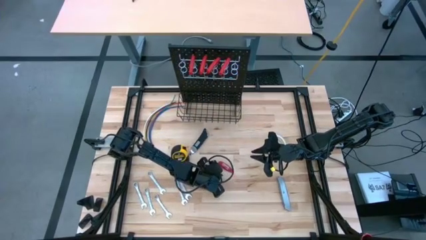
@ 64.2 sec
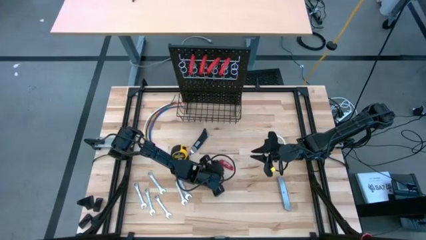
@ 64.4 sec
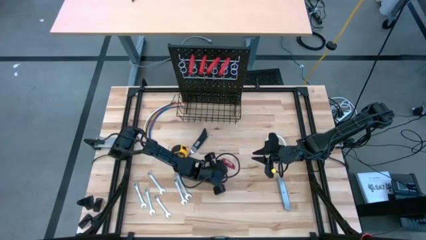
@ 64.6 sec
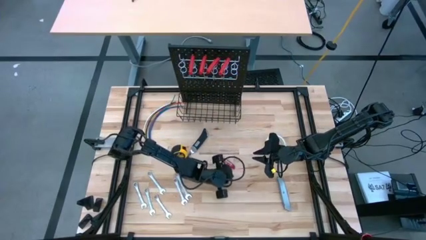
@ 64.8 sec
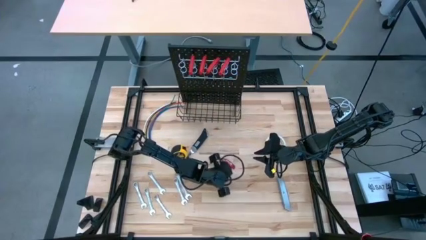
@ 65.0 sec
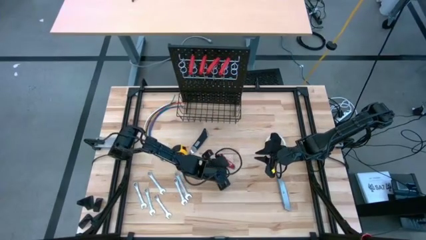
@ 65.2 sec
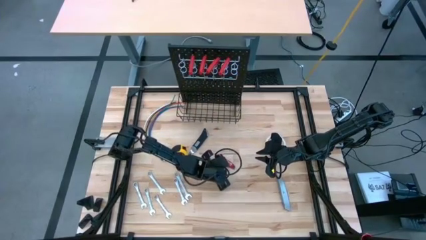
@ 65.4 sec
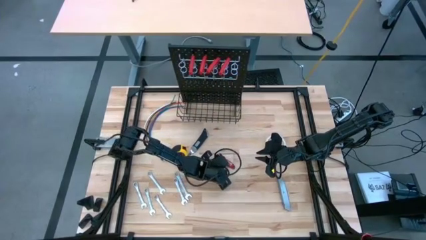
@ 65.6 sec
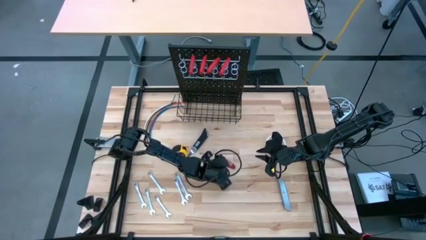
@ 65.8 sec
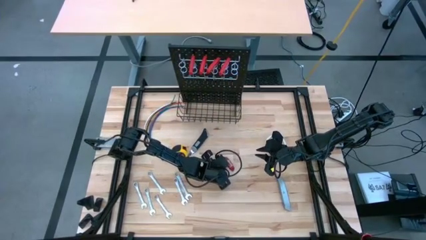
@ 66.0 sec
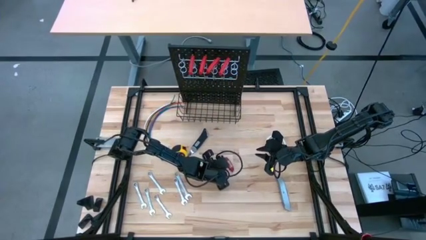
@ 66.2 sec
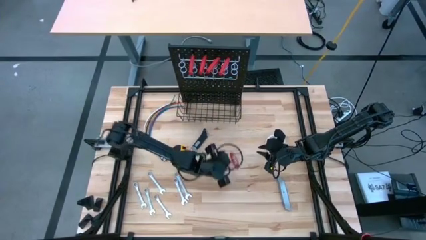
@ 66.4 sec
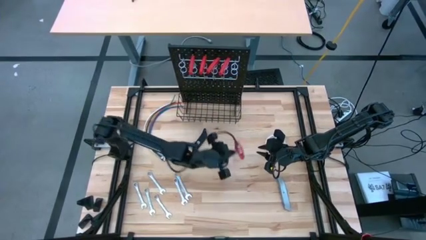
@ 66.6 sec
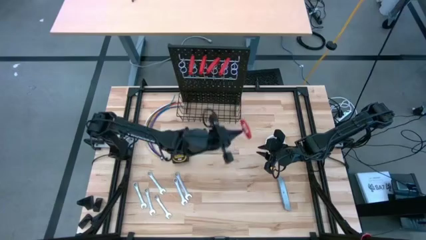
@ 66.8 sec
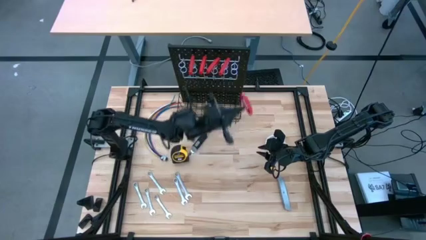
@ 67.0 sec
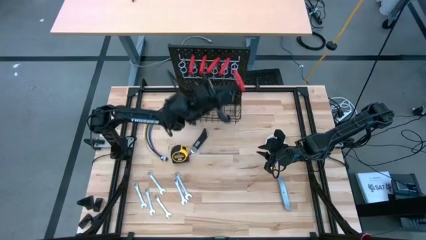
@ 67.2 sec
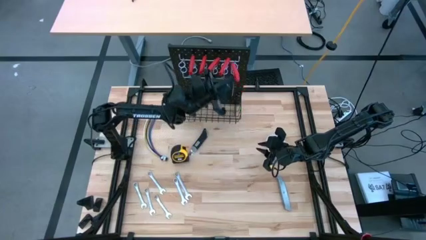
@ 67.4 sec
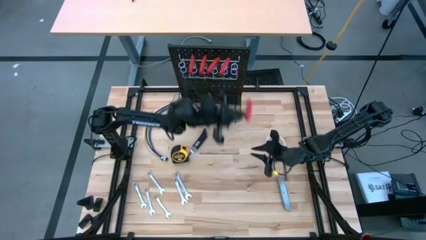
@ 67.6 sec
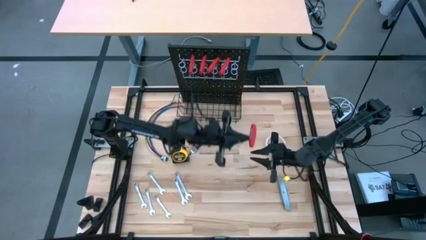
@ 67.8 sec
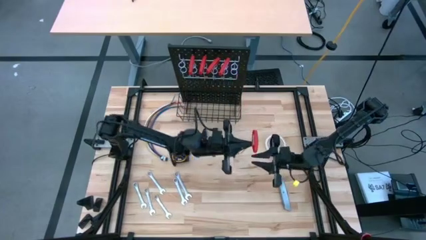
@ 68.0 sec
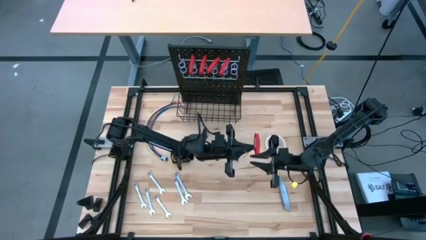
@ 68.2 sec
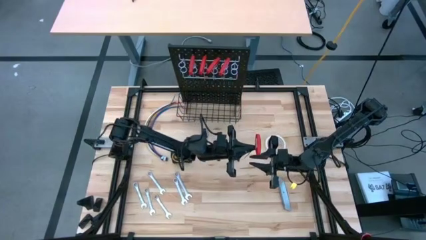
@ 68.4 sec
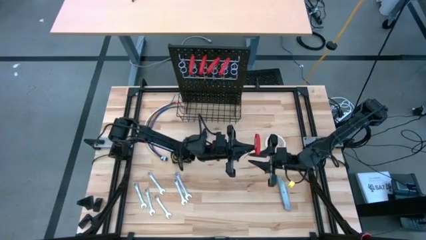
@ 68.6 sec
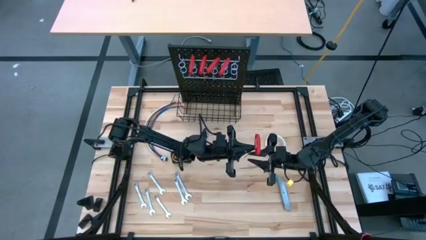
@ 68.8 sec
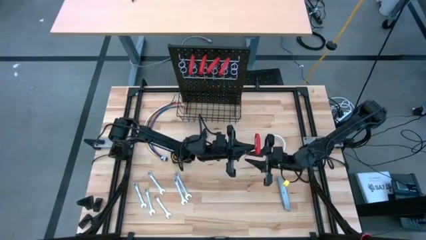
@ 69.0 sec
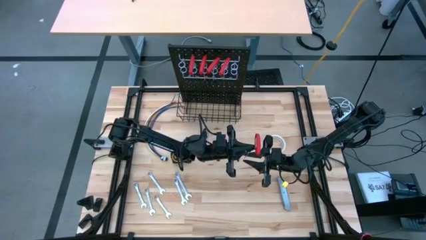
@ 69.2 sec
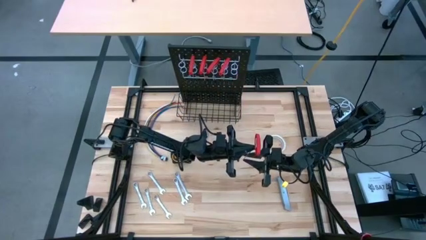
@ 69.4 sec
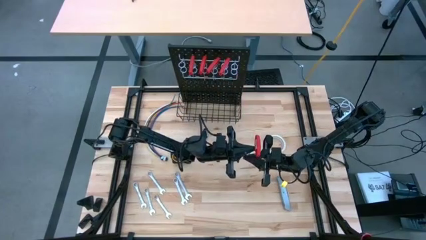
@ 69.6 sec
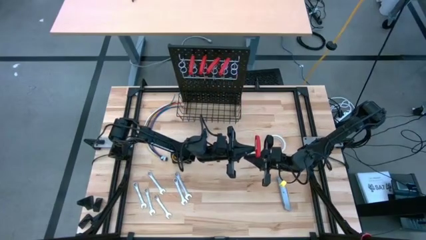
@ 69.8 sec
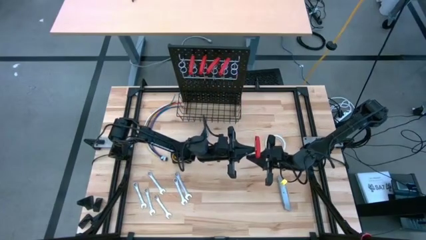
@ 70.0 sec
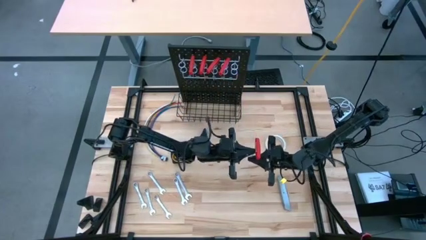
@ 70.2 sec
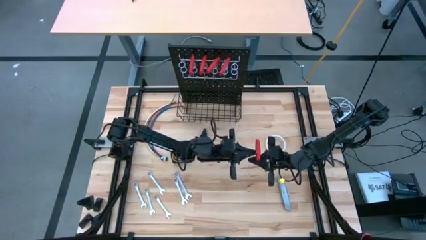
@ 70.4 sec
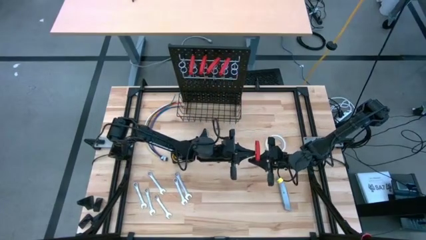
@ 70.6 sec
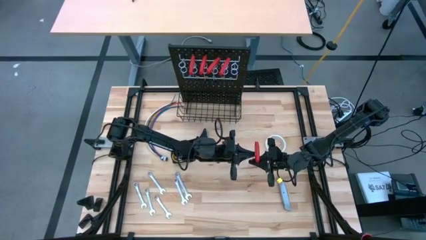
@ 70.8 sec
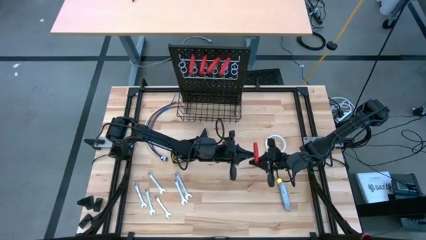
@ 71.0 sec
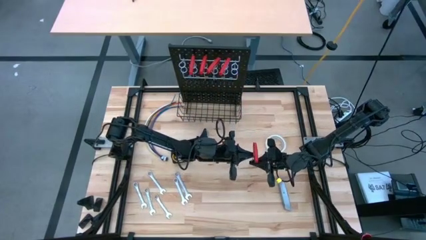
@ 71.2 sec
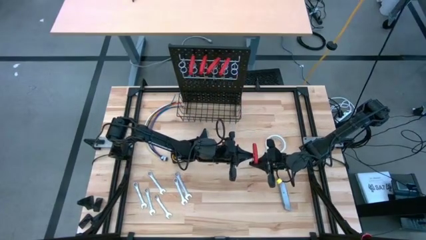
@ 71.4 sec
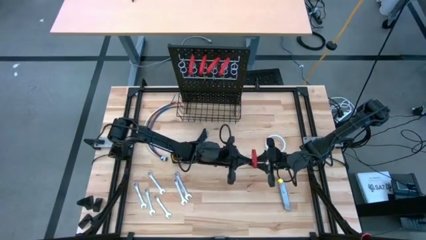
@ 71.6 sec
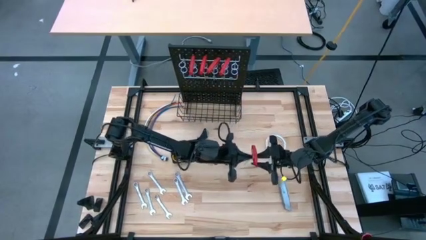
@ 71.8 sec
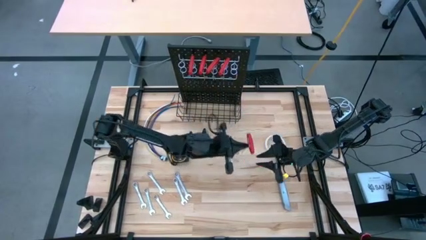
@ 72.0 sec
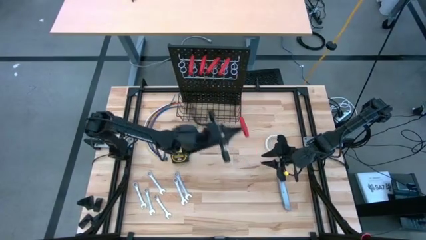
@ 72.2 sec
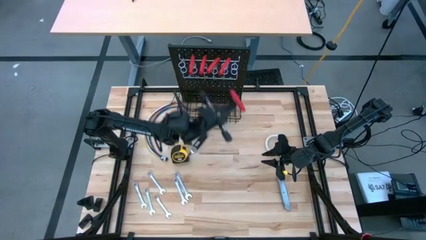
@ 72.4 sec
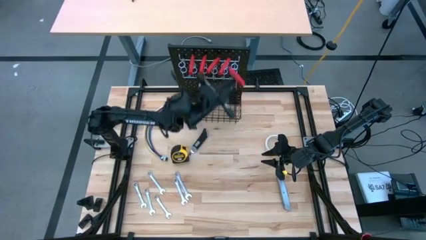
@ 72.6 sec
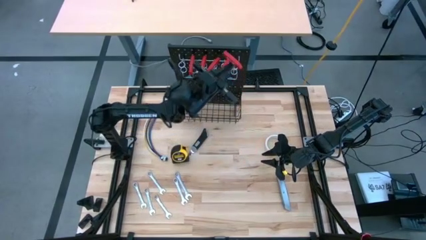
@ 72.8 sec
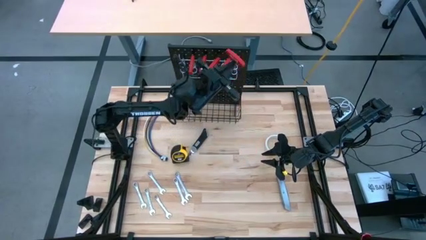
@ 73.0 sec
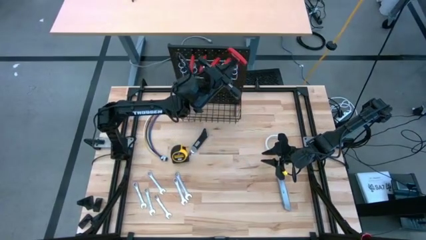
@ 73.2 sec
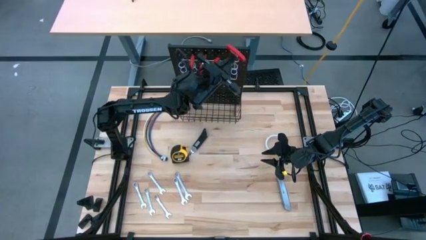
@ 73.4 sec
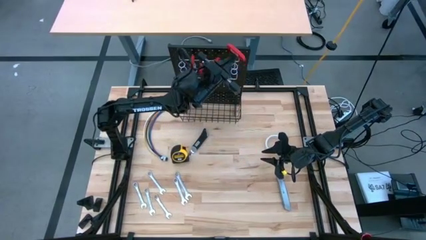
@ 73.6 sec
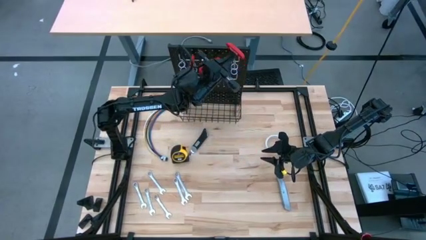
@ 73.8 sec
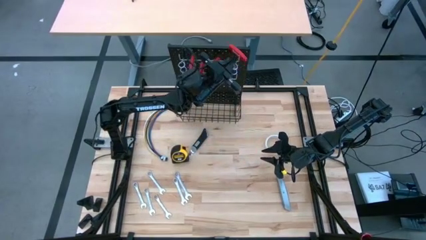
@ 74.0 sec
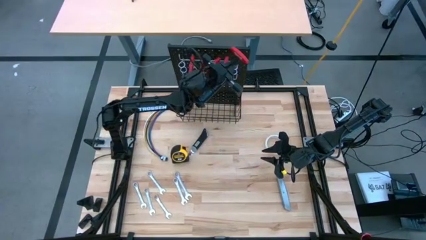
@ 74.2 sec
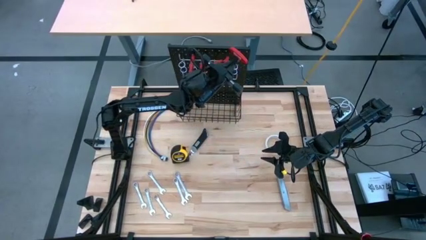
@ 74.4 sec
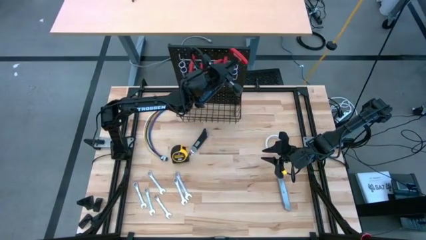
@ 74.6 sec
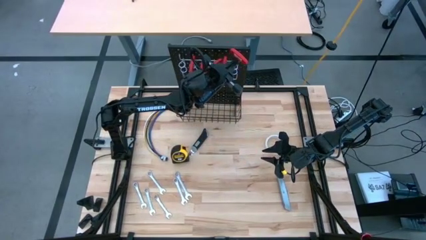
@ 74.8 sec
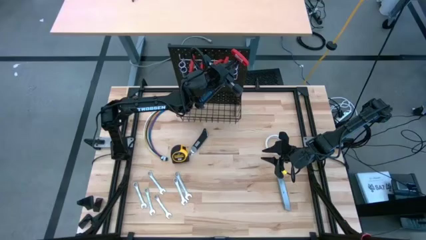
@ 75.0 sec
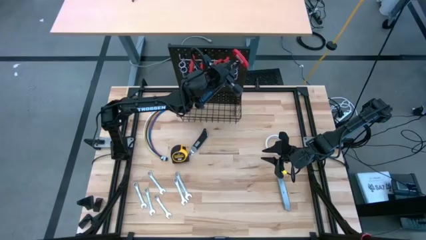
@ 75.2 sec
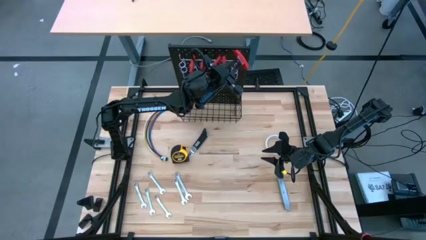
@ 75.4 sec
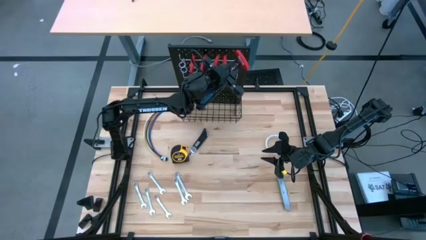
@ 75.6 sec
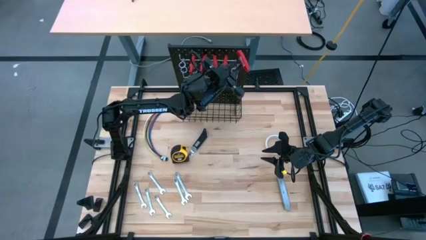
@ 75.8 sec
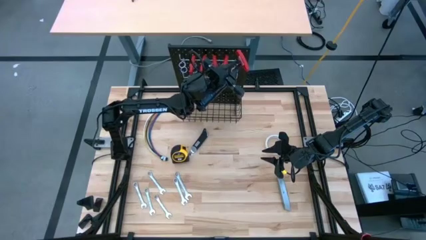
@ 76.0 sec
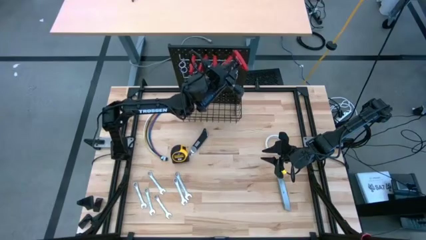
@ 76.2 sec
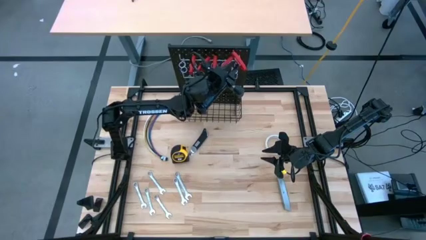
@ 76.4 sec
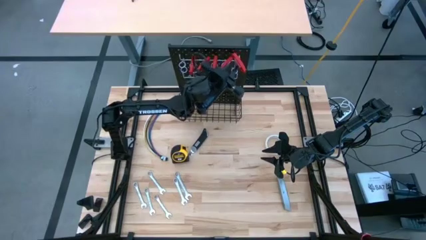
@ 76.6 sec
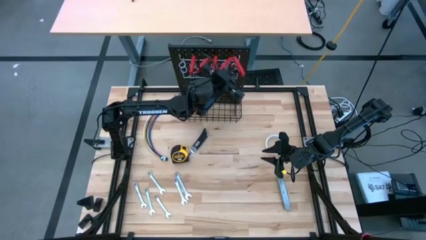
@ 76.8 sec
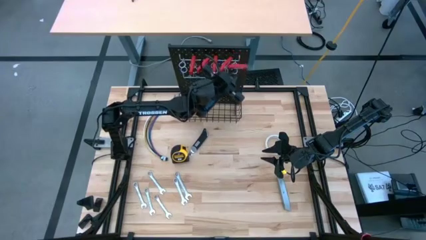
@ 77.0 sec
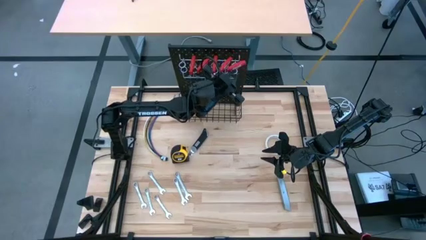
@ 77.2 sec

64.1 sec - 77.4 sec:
Task: Hang tools onto peg board
Hang the allen wrench on the peg board

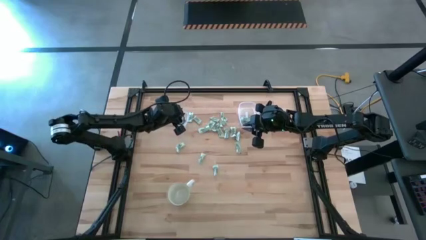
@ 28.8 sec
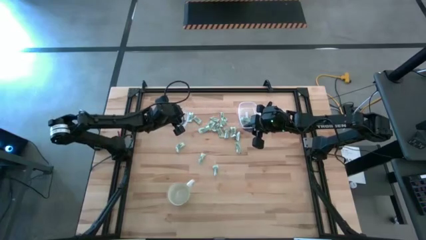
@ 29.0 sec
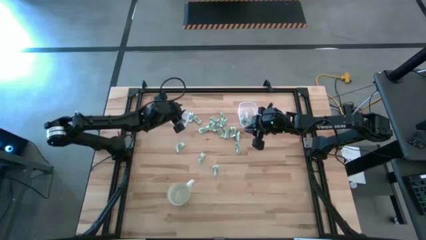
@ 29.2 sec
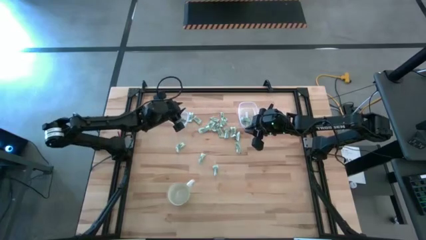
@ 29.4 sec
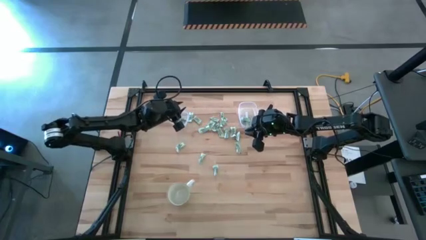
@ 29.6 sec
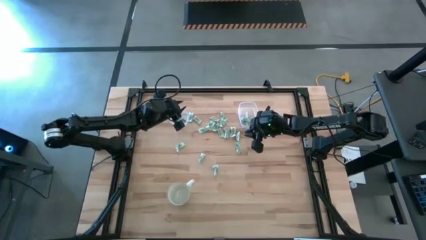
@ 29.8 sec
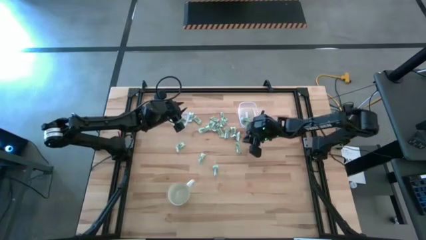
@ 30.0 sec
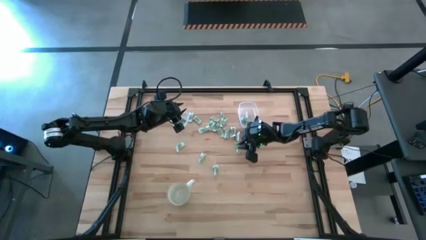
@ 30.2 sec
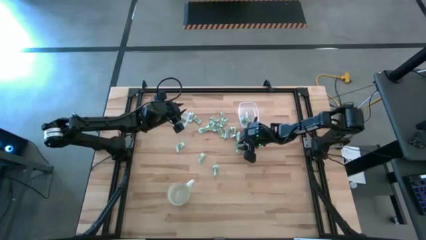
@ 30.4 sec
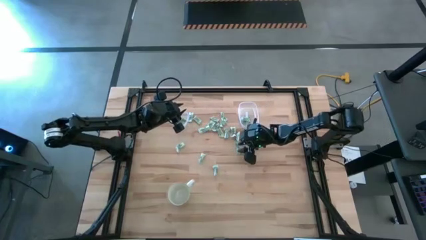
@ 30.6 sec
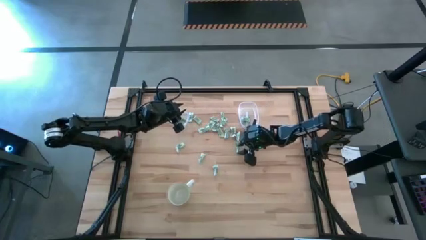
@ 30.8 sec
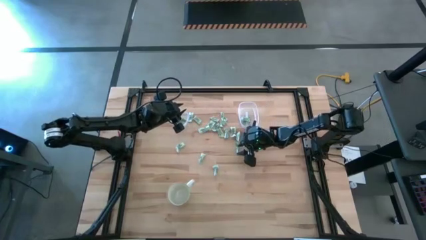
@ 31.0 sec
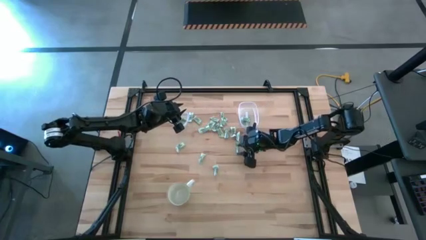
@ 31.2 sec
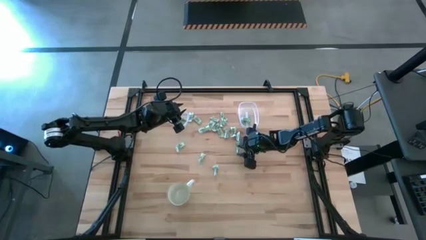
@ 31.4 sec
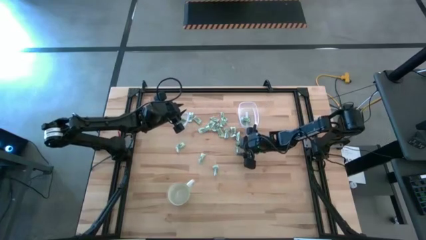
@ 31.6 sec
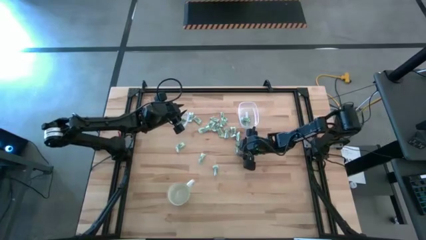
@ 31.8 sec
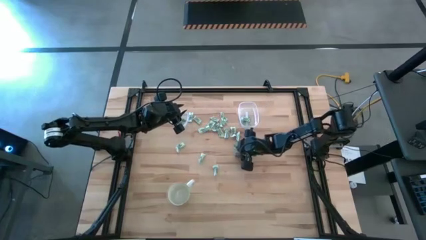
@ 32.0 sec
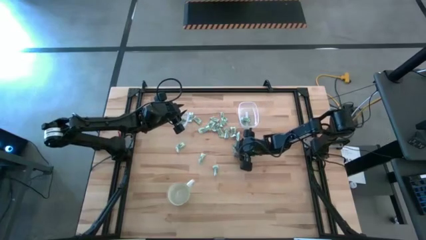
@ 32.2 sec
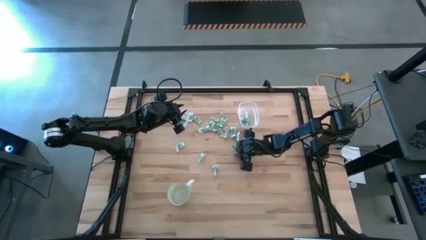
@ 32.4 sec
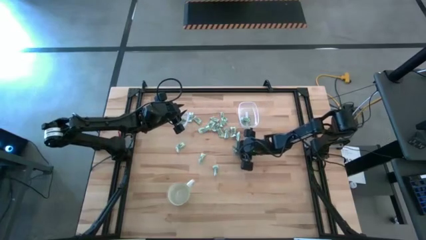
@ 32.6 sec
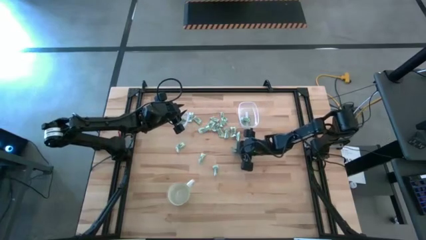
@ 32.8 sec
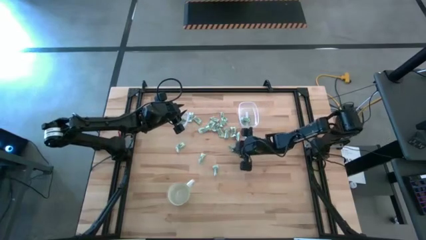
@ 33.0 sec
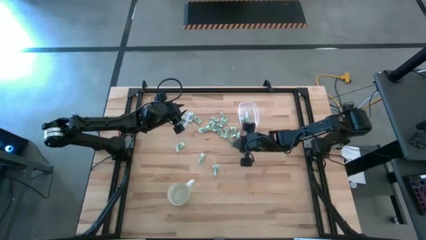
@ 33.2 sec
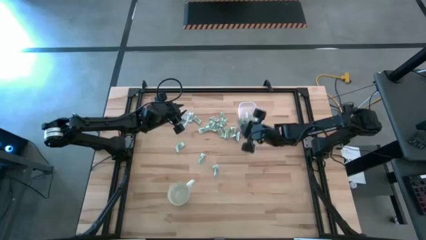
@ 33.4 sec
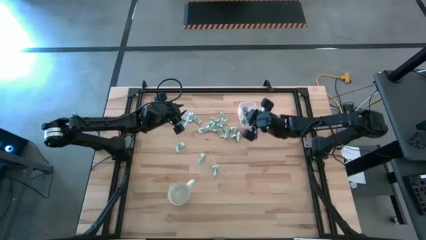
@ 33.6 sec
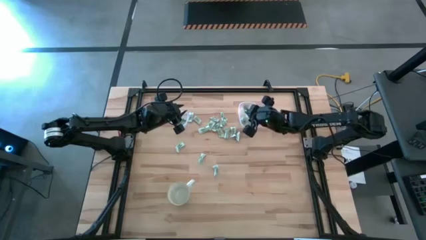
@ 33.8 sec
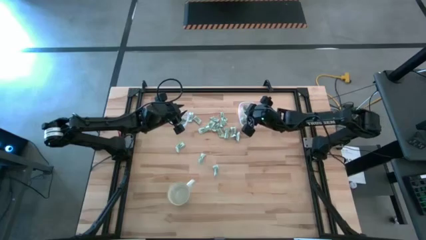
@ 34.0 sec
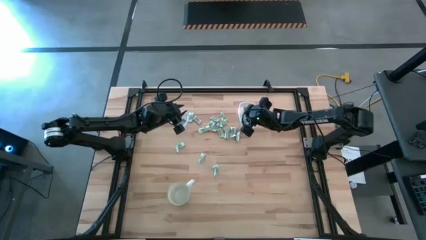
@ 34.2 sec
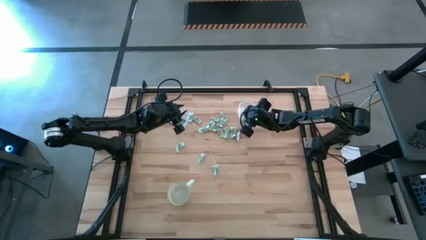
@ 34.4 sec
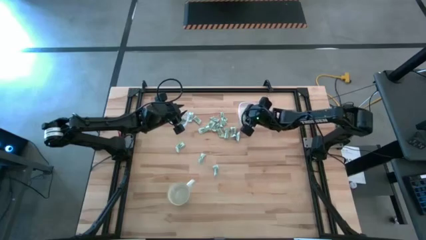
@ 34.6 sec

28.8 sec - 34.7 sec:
Task: Pick and place items into bin
Put the green stevia packet into the rectangular transparent bin
